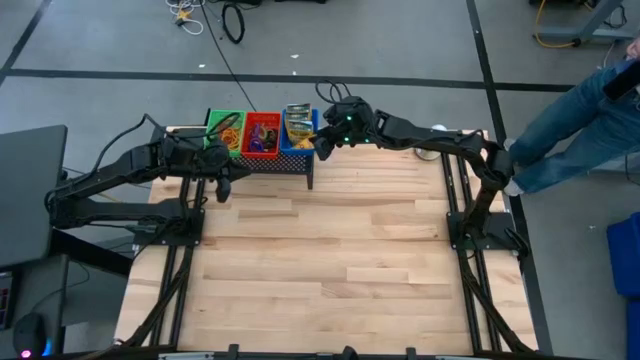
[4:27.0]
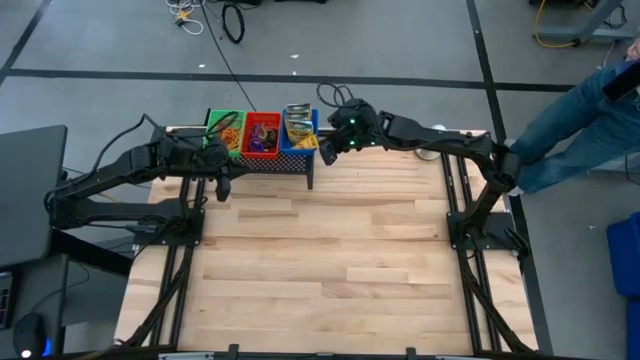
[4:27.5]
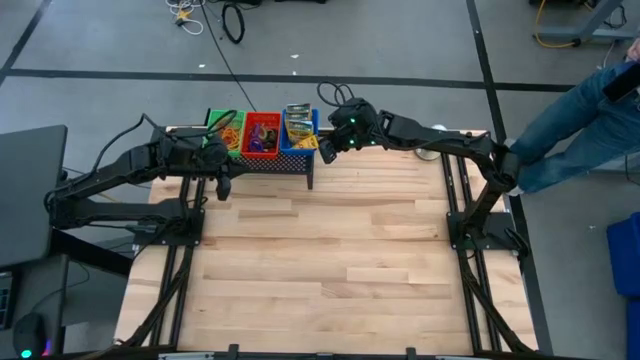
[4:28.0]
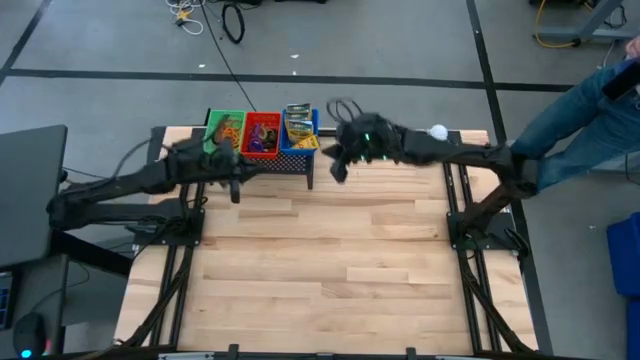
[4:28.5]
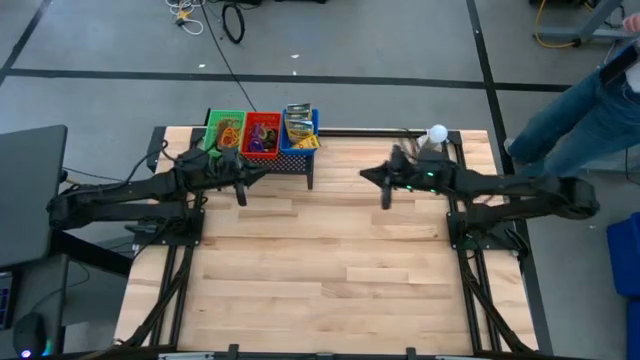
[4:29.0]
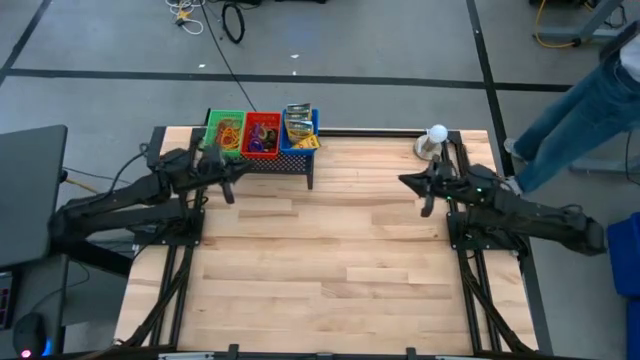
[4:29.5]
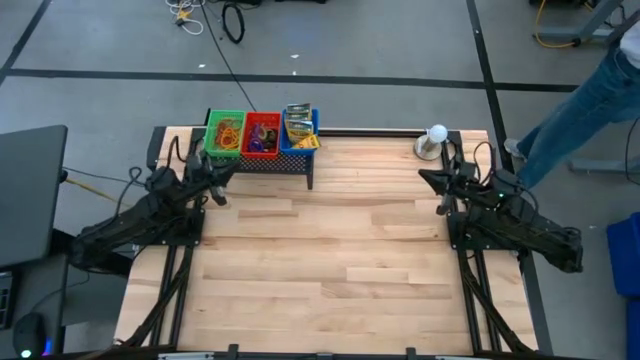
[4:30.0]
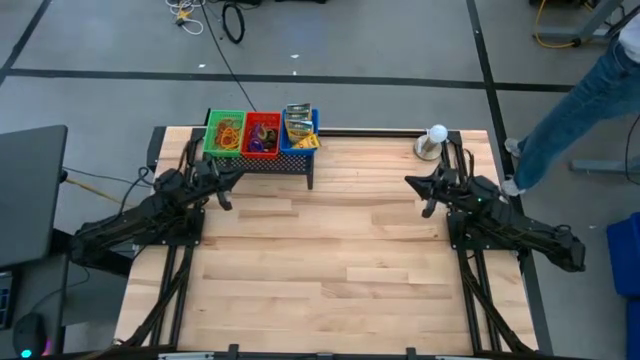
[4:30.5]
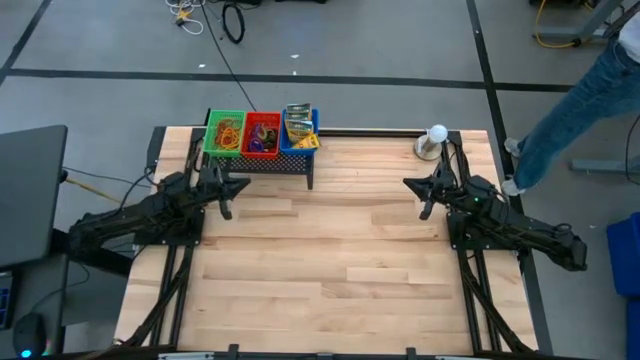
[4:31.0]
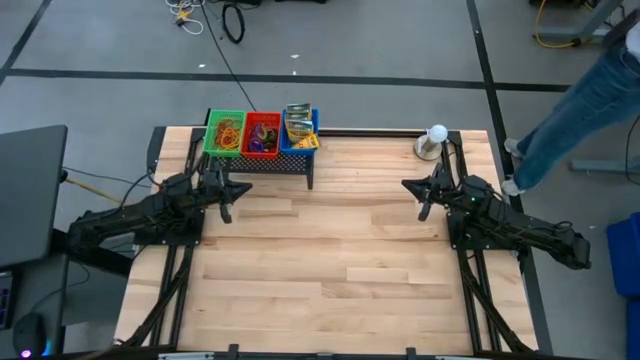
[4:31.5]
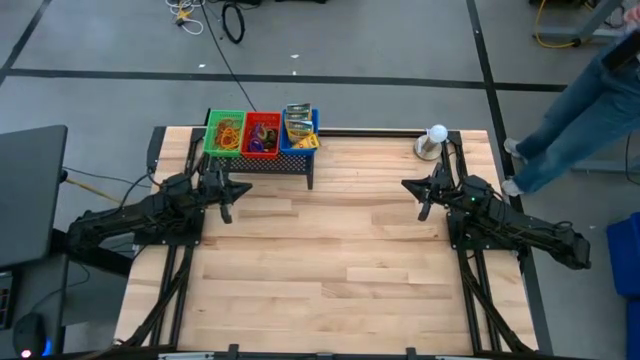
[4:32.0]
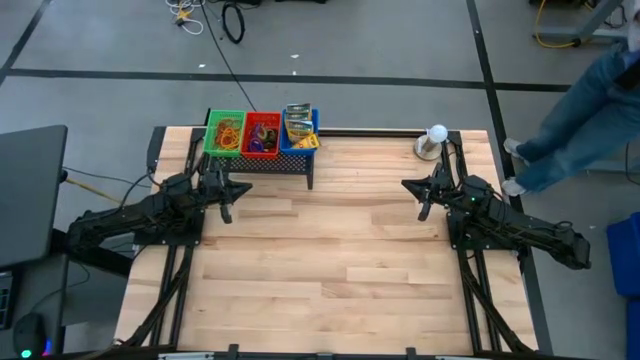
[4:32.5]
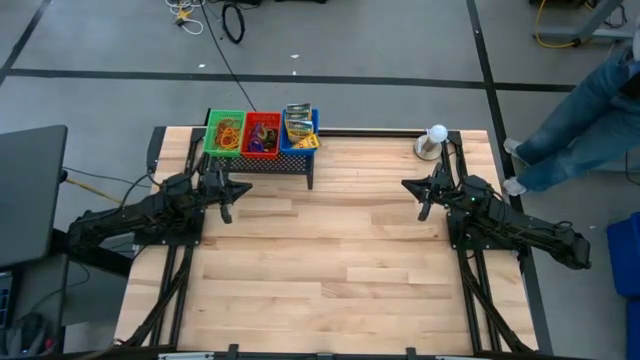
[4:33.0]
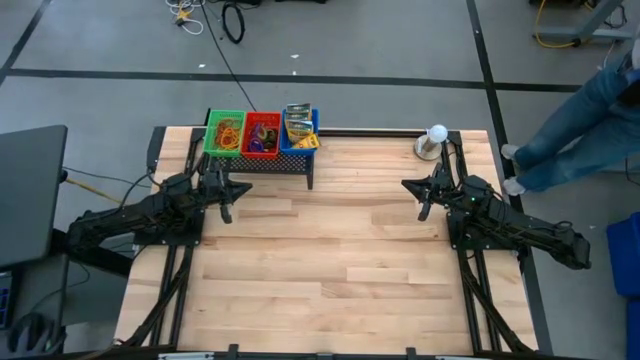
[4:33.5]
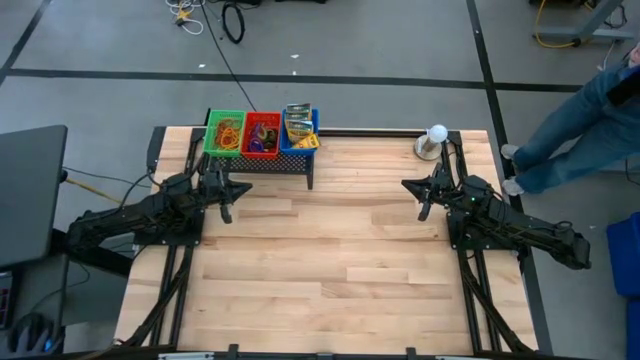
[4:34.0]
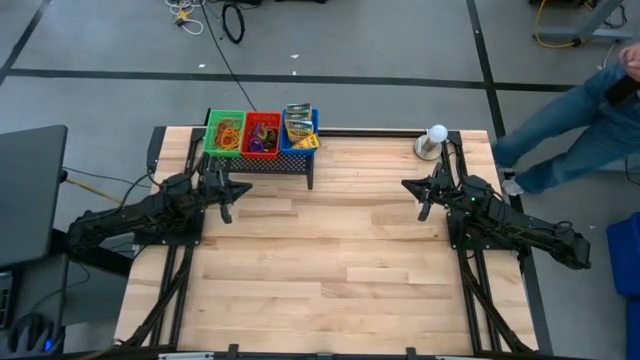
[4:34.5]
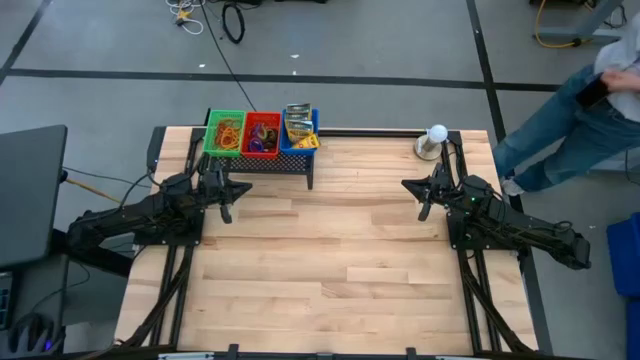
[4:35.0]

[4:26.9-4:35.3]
Task: Pick & Place Office Desk Supplies
Return to Home Position

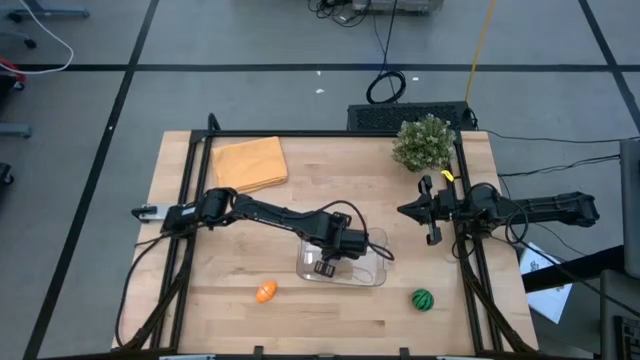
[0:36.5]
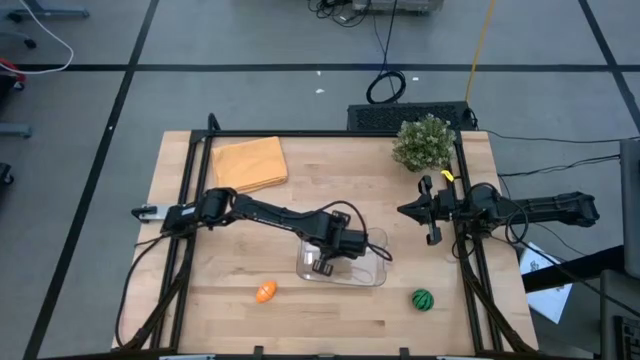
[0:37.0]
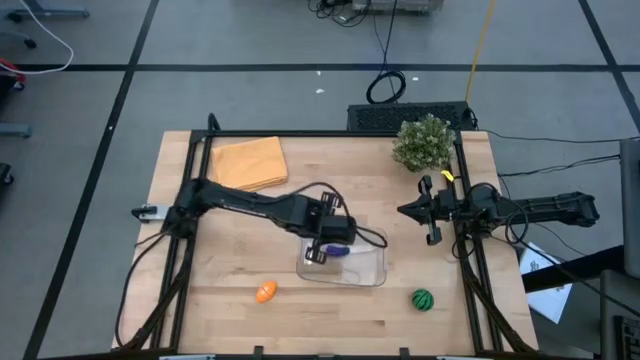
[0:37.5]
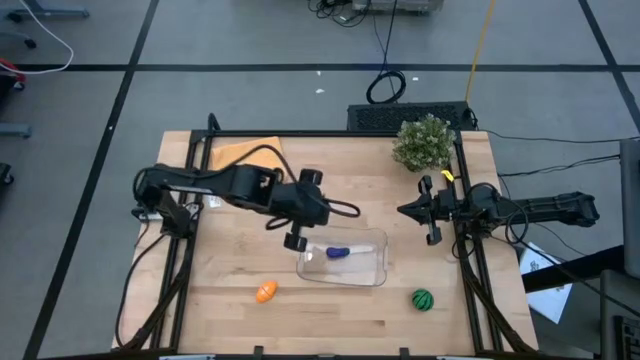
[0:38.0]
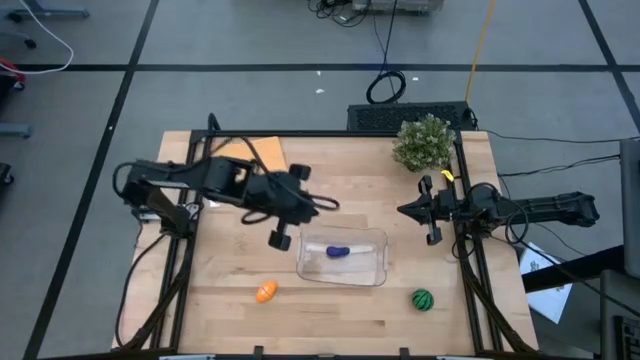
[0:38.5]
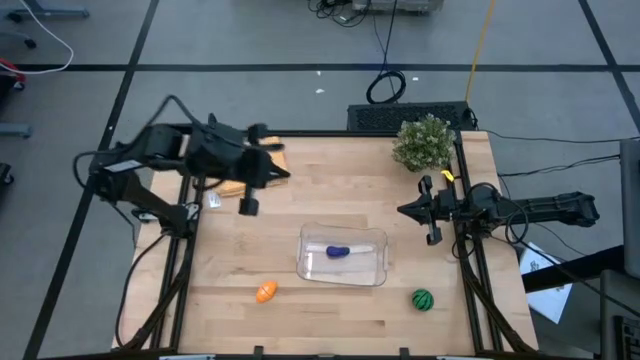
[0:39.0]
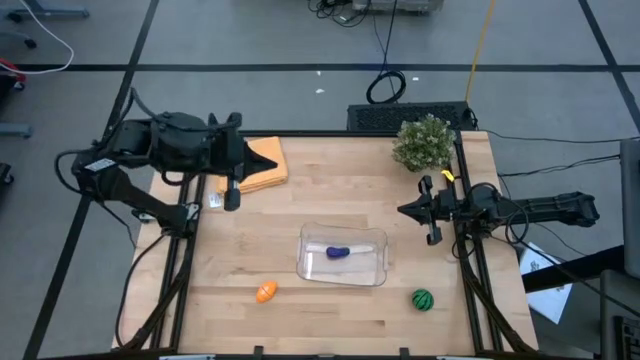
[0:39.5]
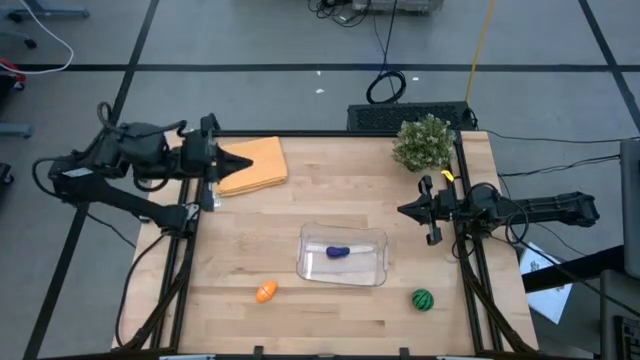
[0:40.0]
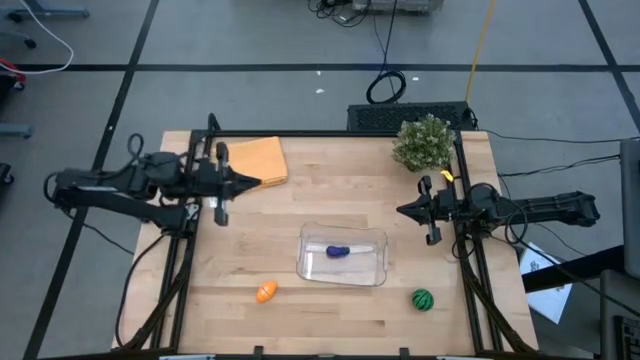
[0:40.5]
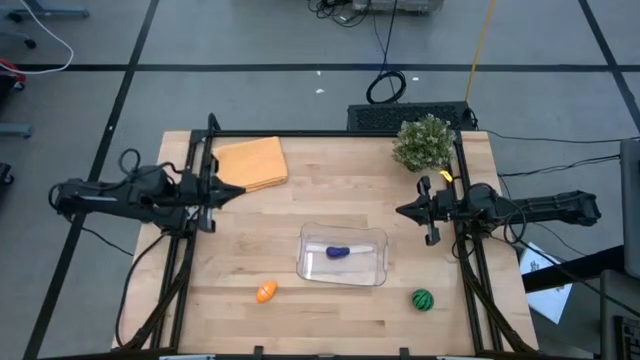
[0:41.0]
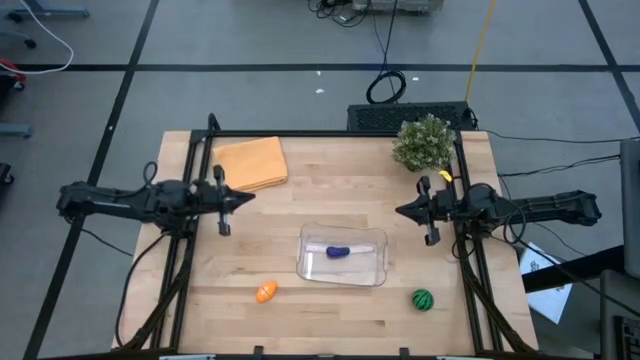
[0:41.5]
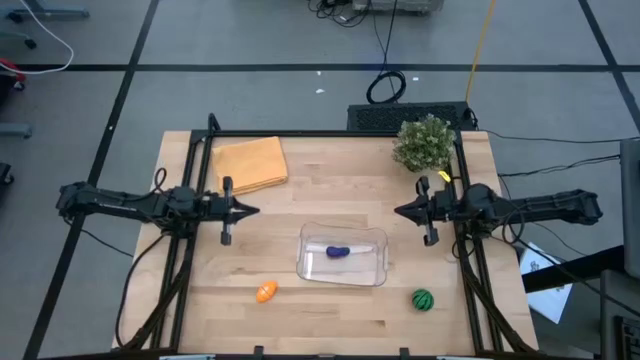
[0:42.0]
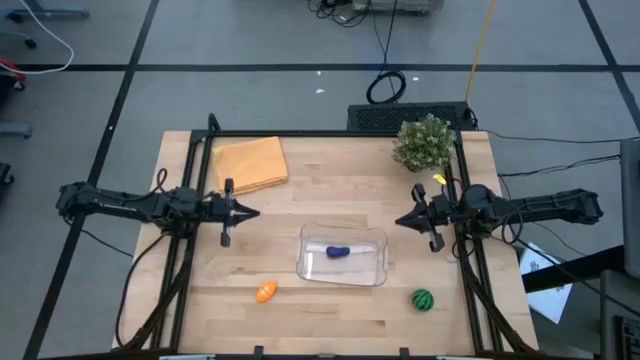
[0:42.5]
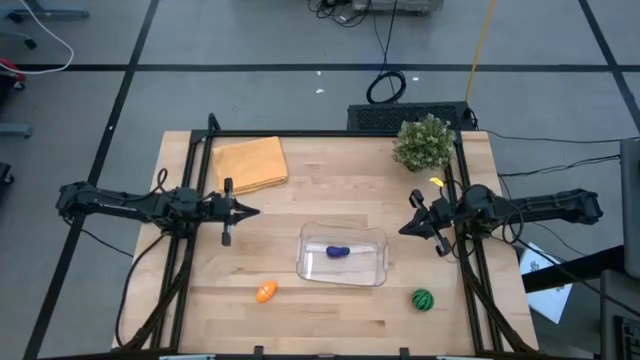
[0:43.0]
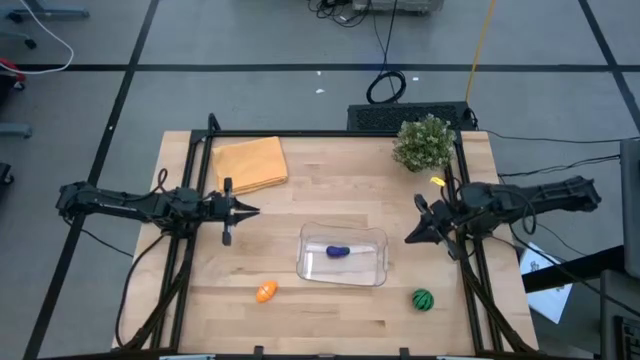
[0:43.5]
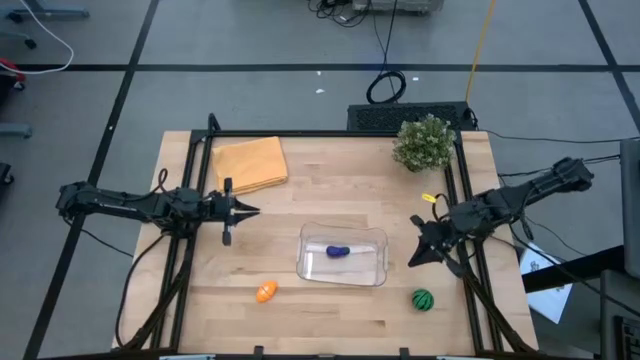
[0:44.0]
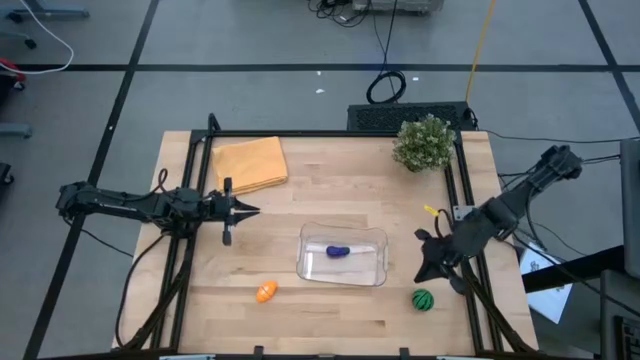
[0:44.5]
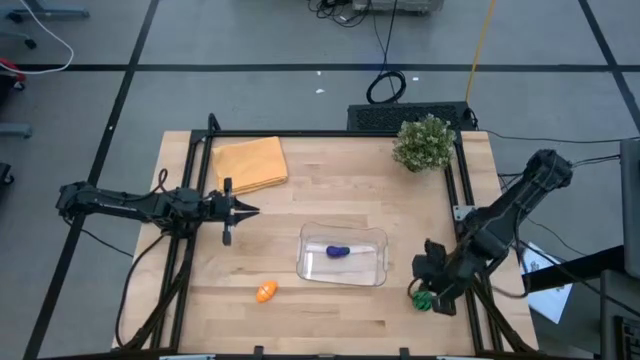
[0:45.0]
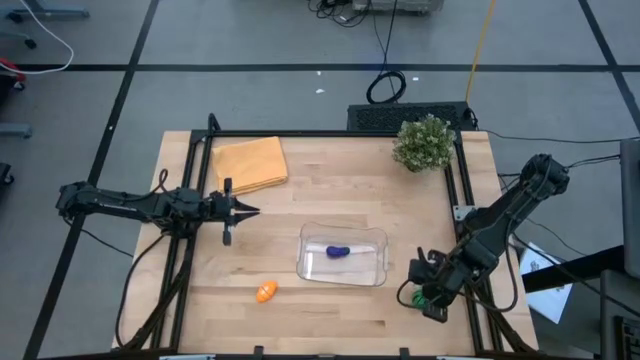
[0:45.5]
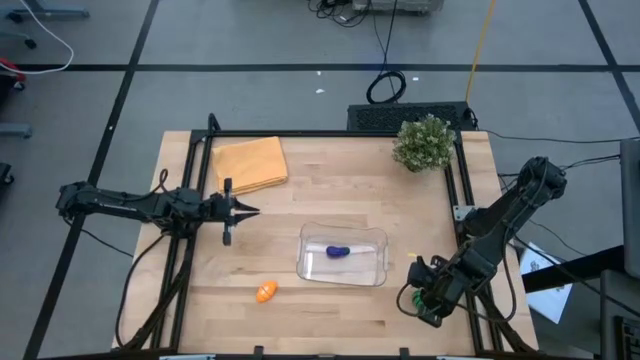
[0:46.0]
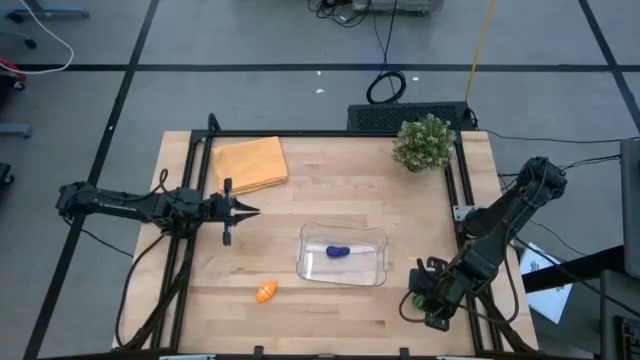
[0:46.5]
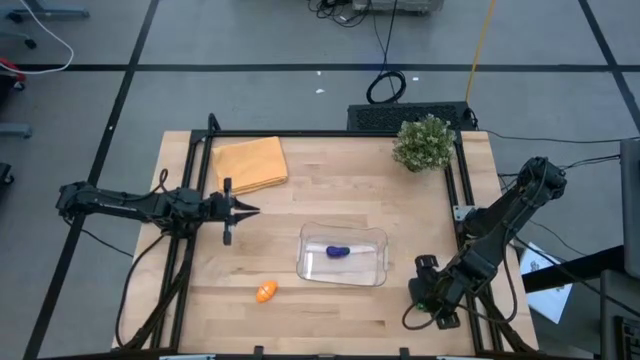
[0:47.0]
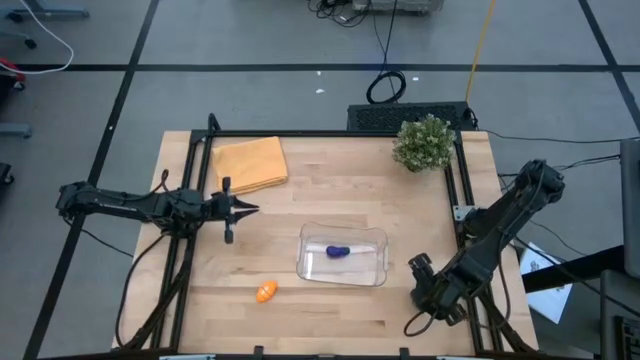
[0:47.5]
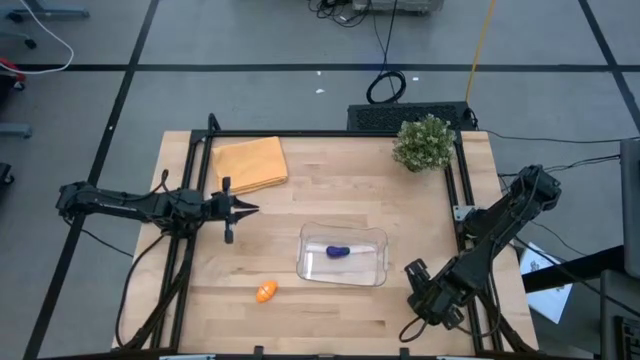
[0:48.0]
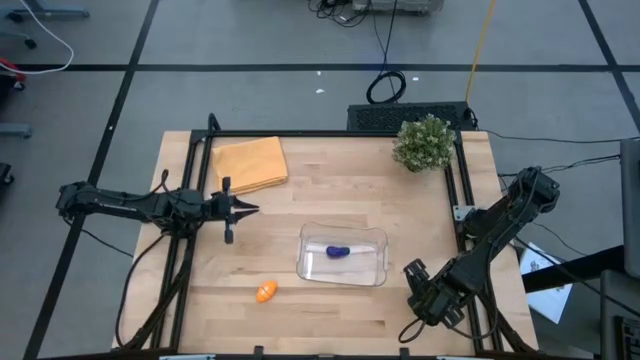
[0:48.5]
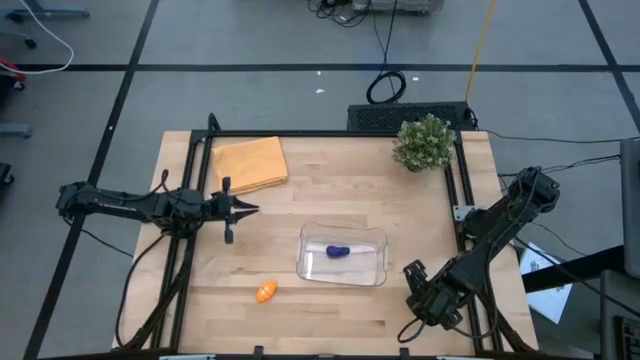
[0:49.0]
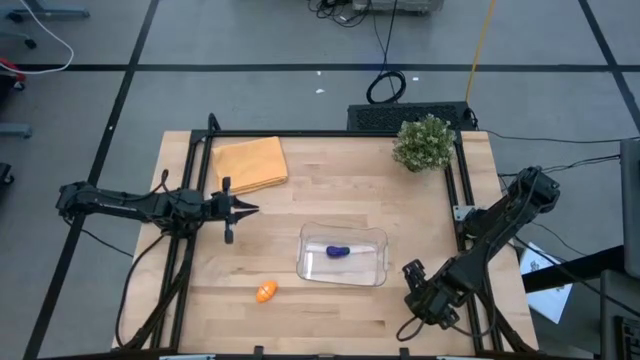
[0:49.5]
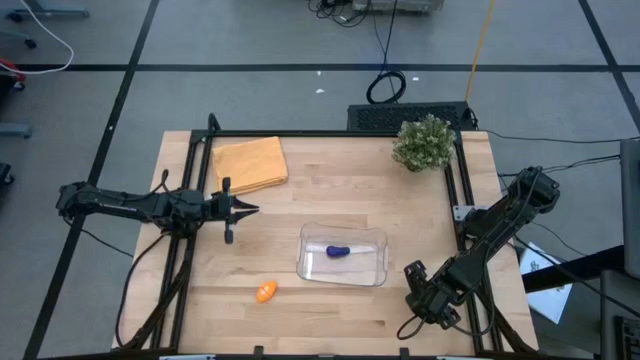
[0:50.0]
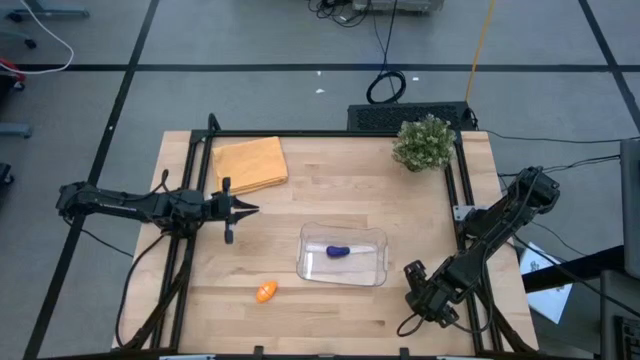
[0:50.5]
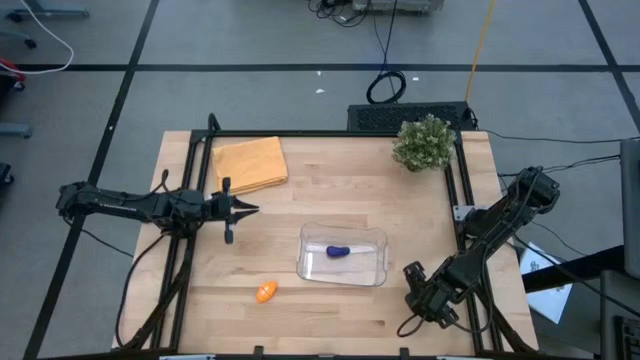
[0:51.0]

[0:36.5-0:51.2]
Task: Pick and placing Produce into tupperware
Put the green watermelon into the transparent bin
